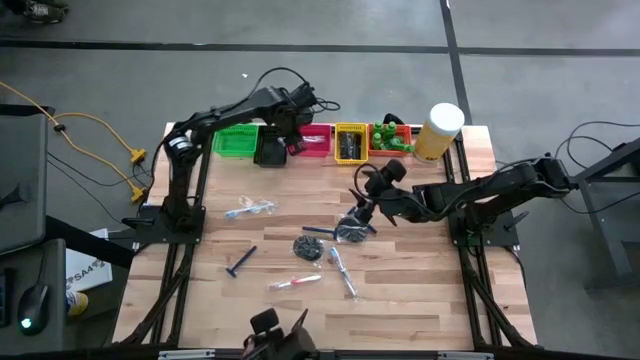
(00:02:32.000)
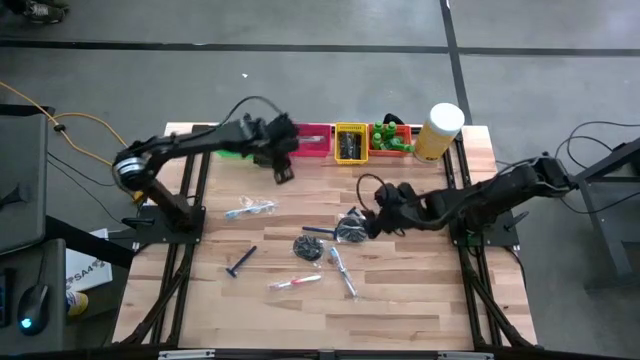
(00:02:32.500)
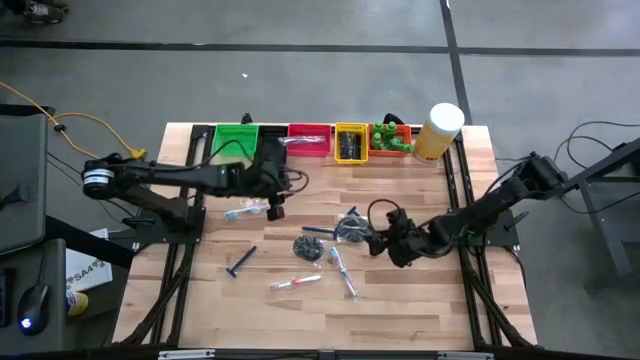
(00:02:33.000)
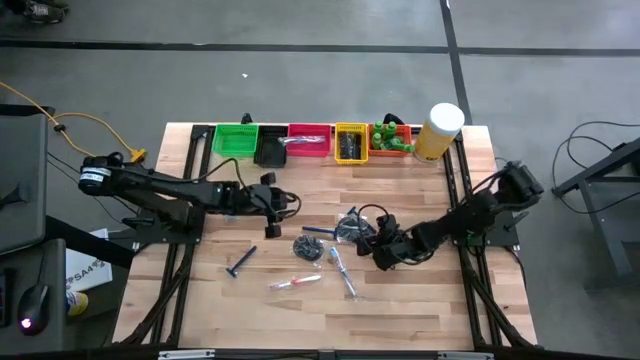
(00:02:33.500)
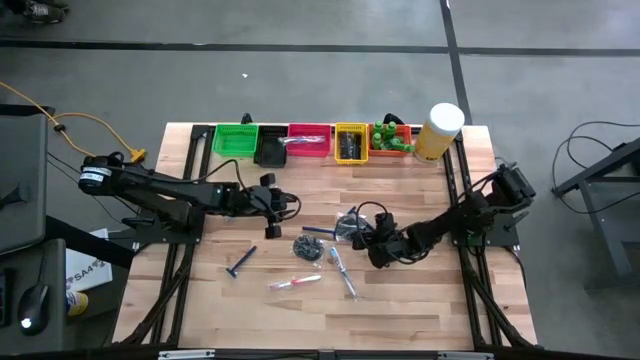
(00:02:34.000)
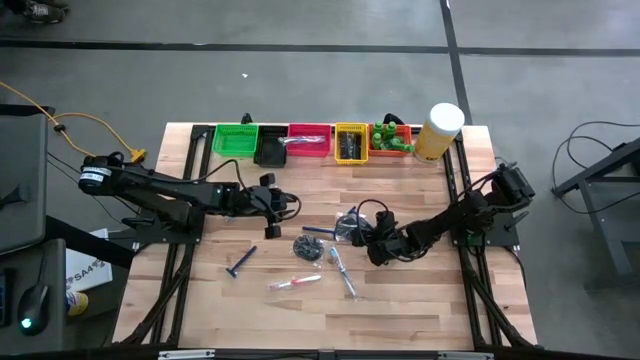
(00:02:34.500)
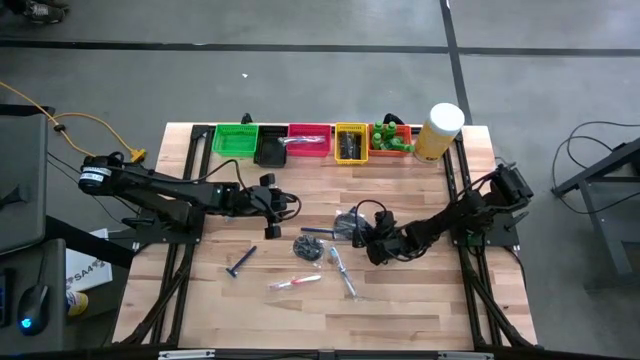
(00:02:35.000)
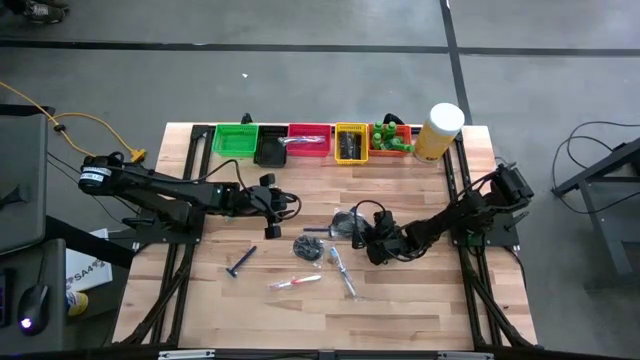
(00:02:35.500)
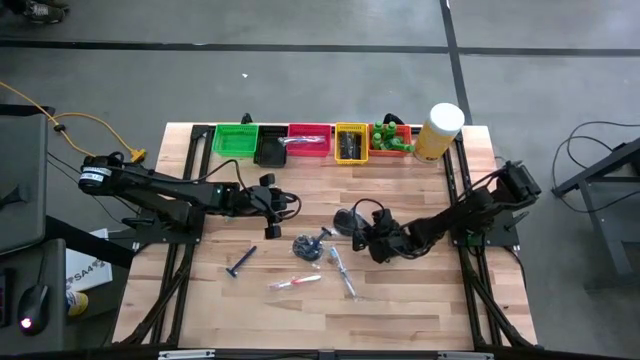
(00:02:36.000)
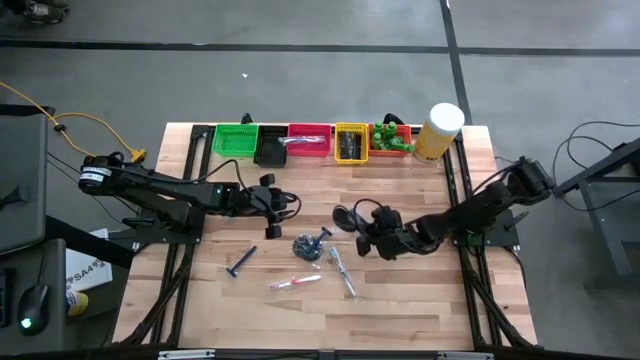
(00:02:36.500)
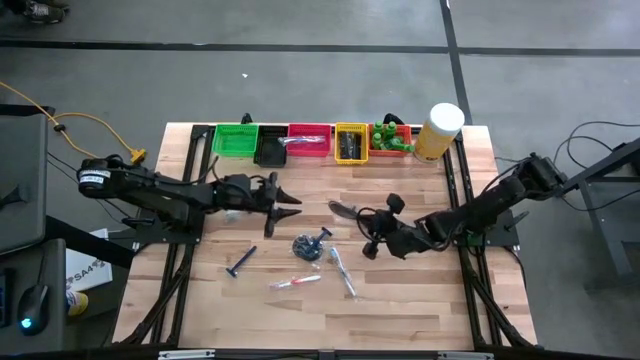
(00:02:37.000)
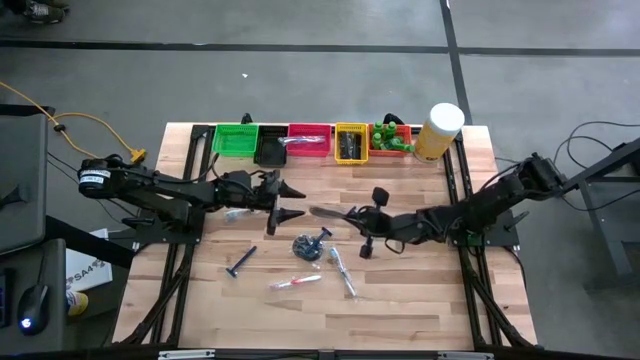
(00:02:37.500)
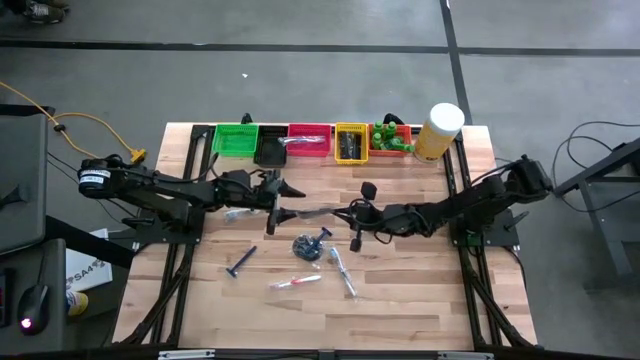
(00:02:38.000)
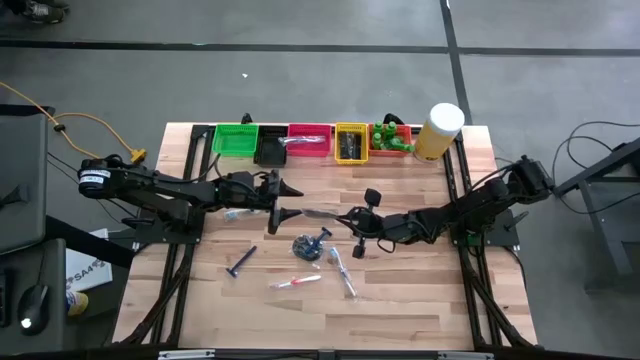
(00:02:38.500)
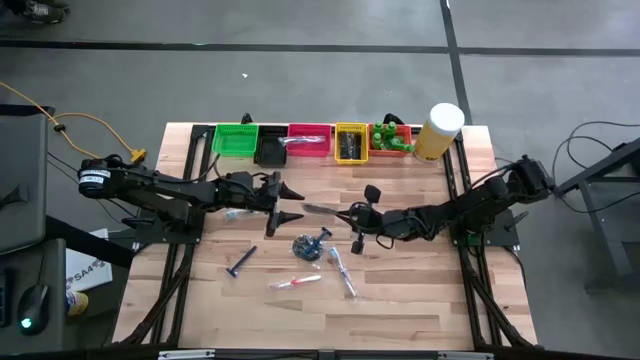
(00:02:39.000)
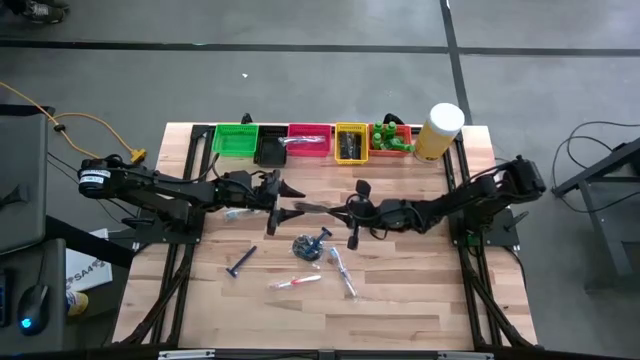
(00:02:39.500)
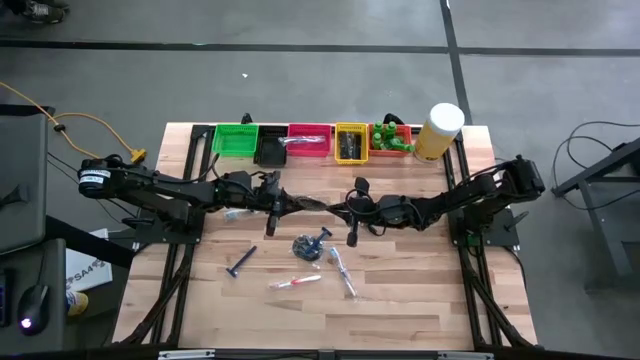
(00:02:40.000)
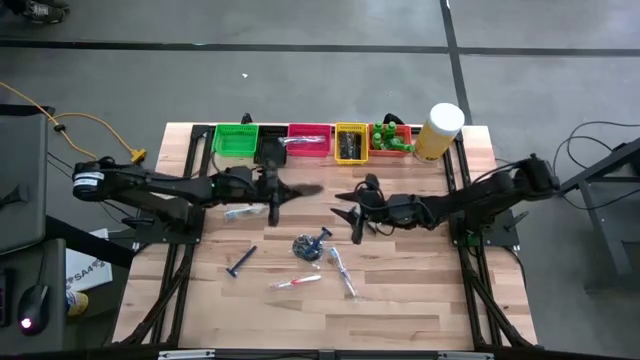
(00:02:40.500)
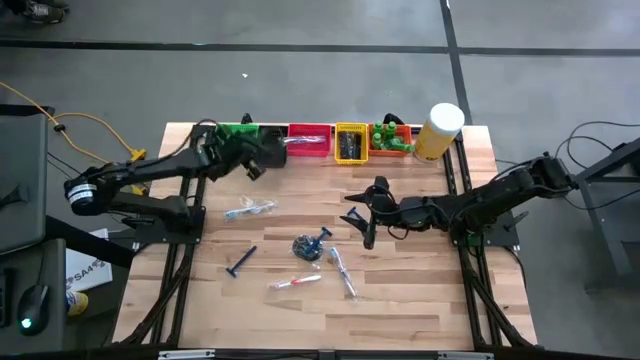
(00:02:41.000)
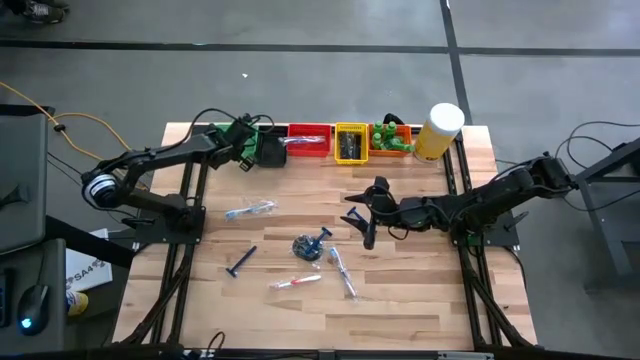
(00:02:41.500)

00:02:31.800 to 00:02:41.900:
Task: Pick & Place Travel size toiletries
Put the hairbrush into the green basket

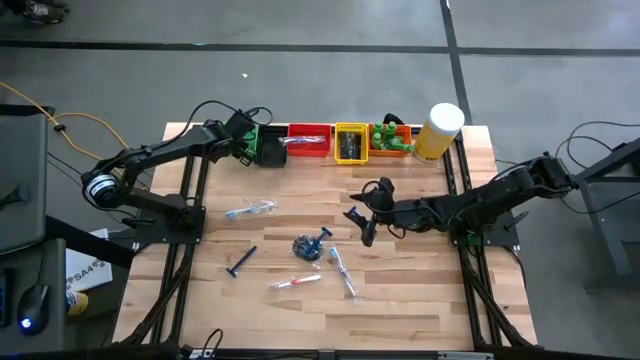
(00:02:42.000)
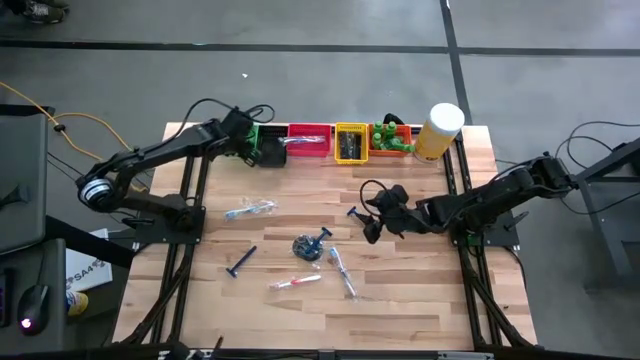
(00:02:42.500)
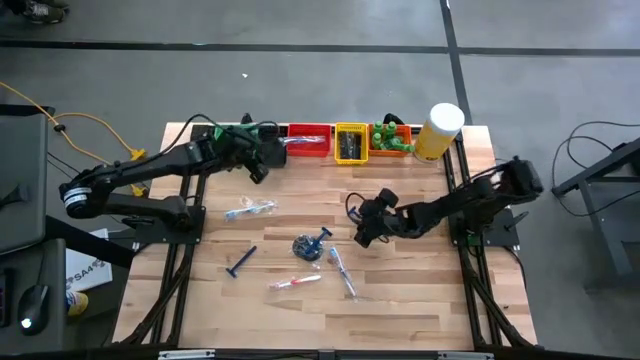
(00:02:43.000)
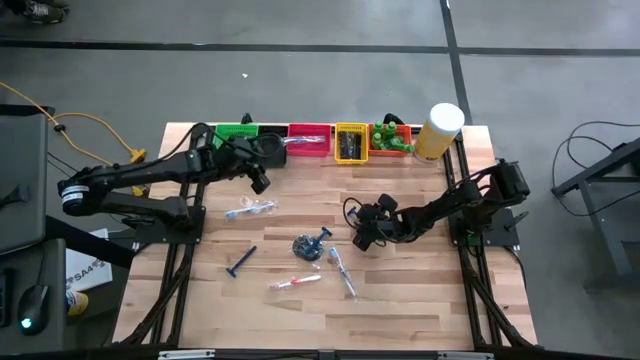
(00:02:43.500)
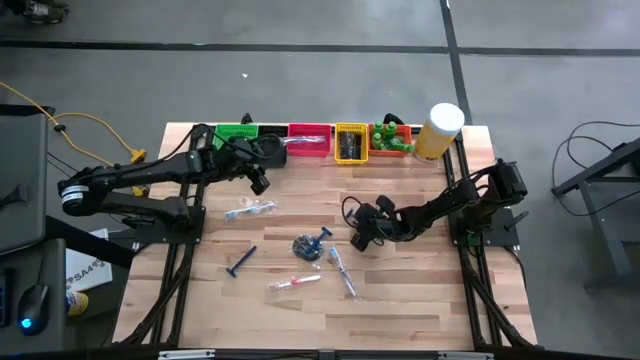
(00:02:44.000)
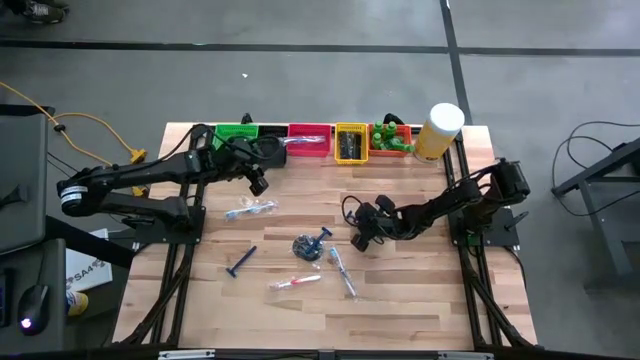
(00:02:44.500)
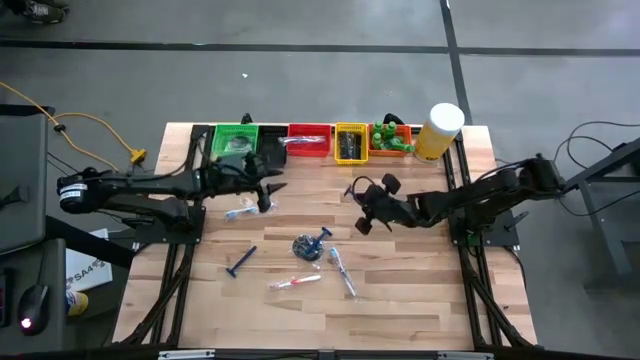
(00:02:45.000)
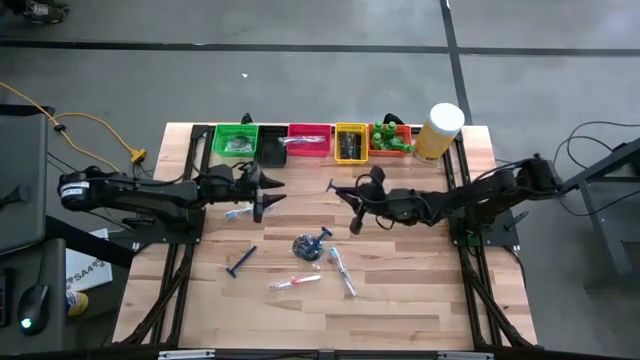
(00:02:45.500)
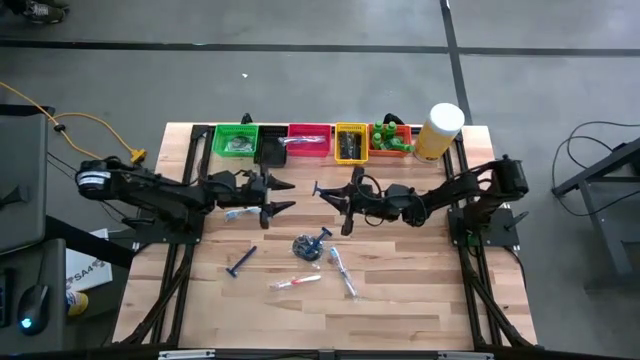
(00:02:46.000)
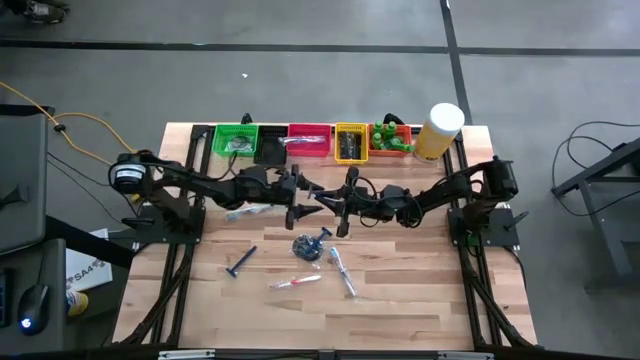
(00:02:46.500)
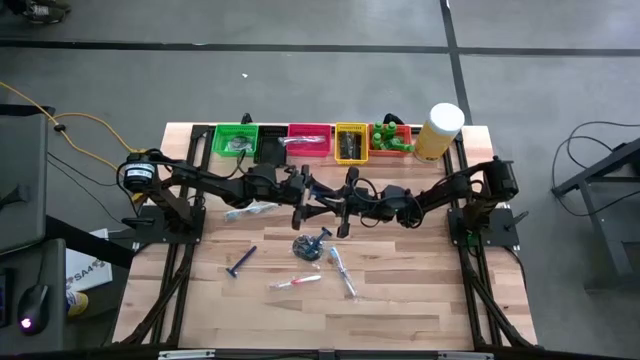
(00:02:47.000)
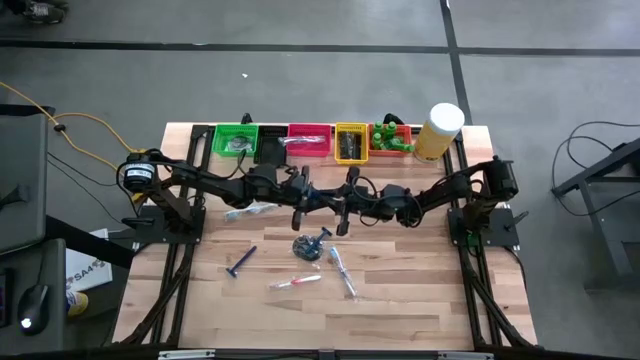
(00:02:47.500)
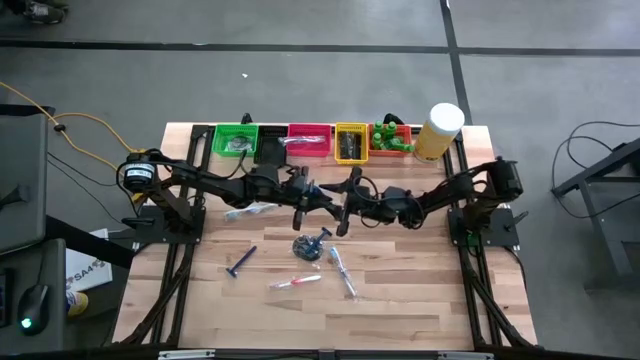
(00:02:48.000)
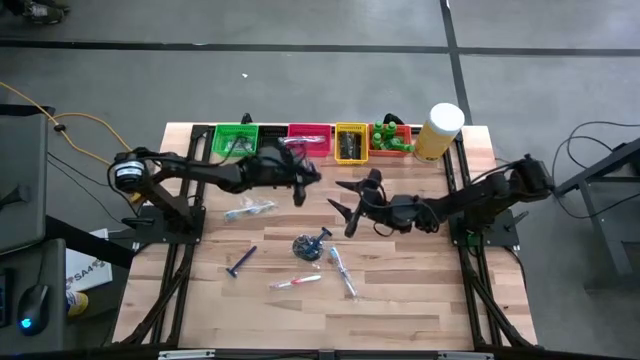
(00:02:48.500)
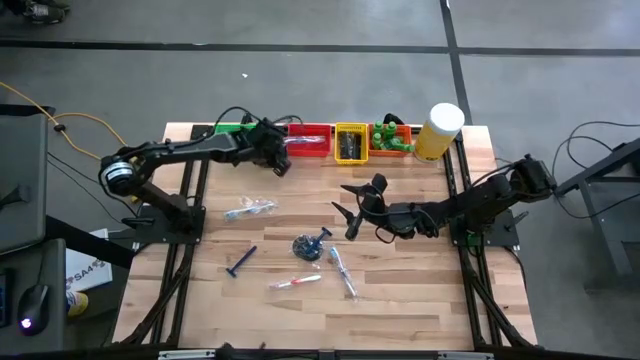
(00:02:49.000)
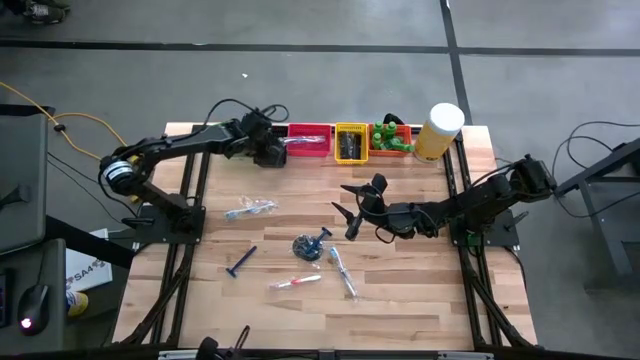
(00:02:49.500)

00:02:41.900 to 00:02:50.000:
Put the blue razor into the black basket

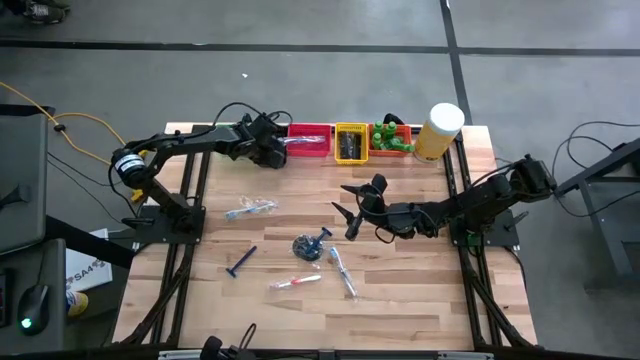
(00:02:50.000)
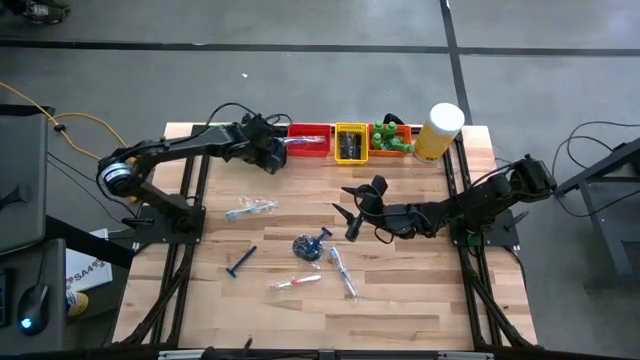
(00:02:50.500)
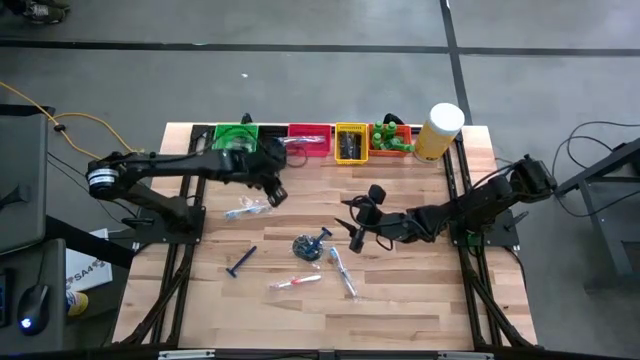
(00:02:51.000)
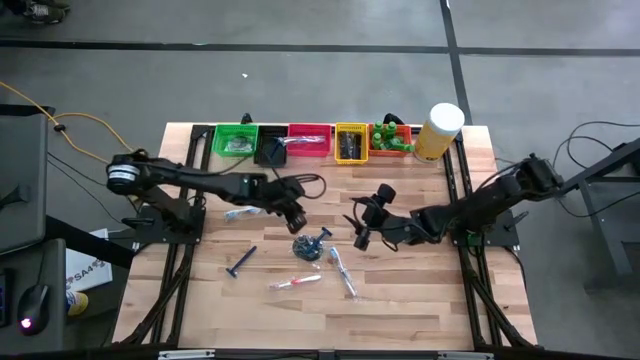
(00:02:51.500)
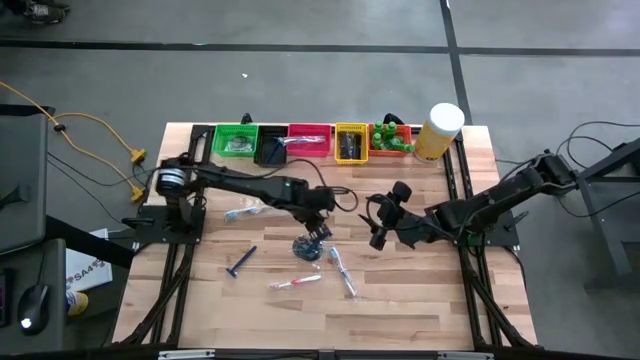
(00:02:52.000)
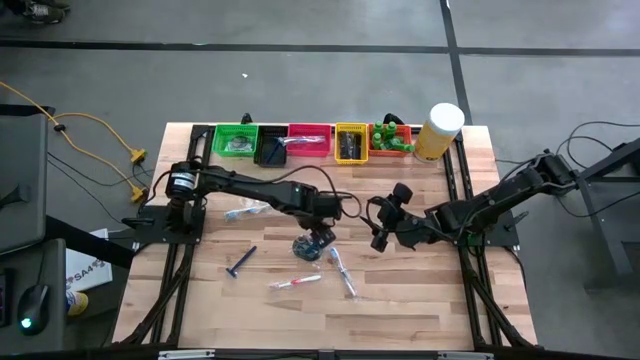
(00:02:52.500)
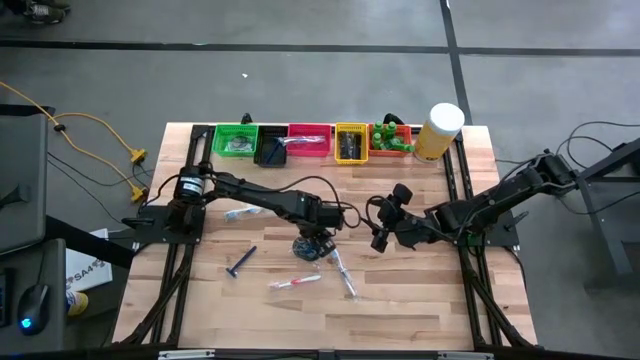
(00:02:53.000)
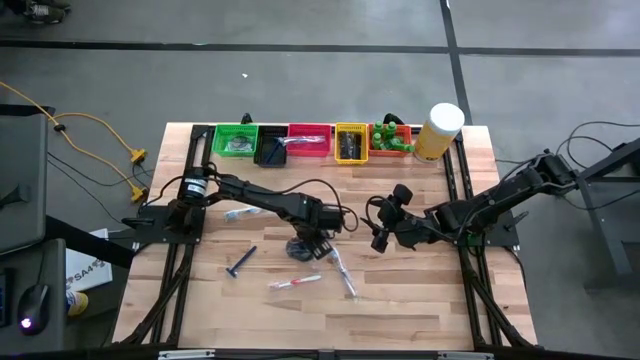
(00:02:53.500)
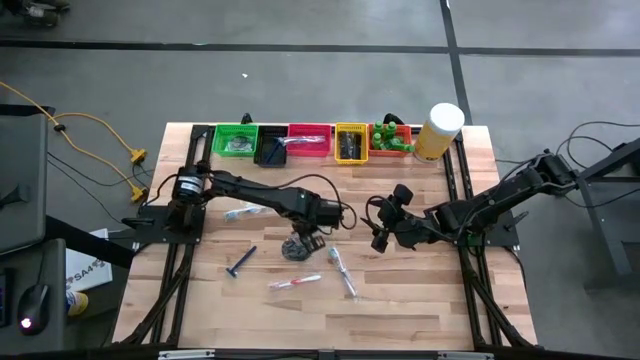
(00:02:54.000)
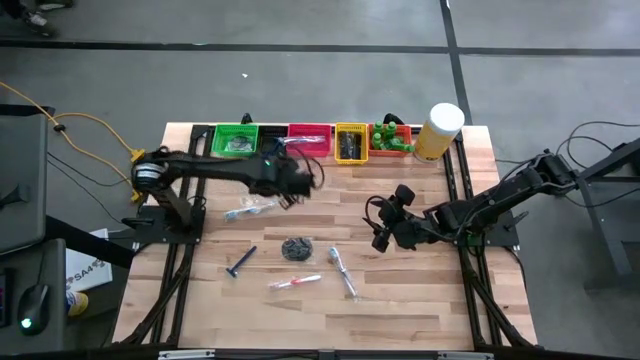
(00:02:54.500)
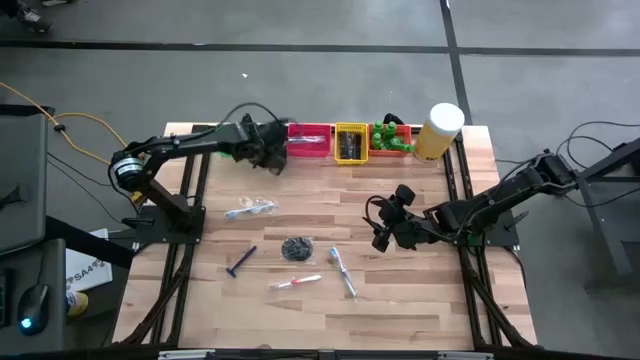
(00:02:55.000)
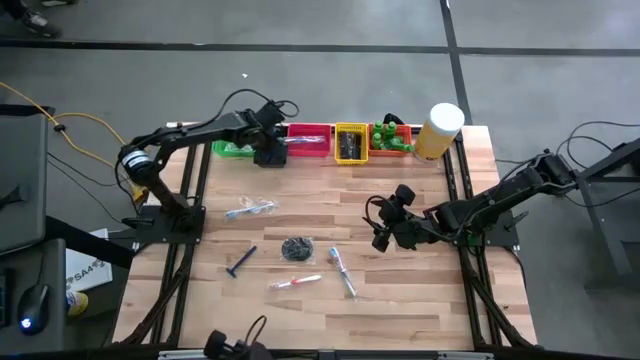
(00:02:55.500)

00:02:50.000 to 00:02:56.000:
Put the blue razor into the black basket
